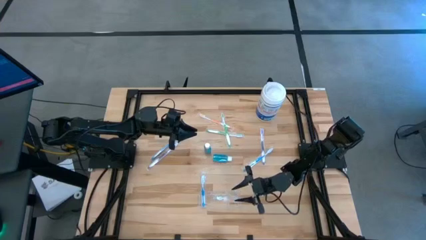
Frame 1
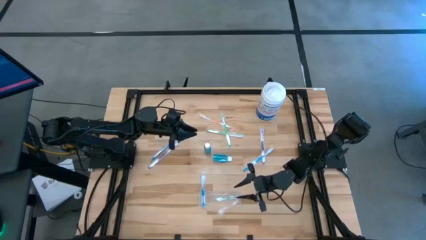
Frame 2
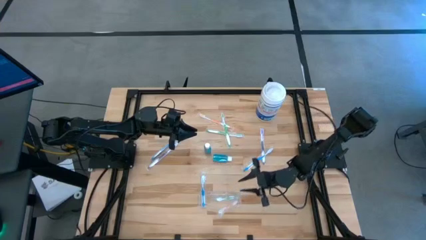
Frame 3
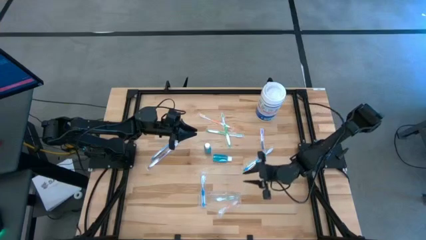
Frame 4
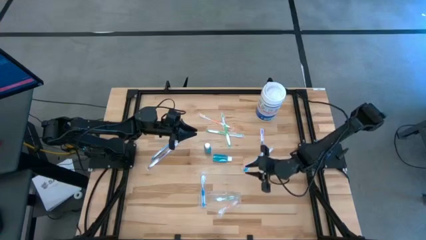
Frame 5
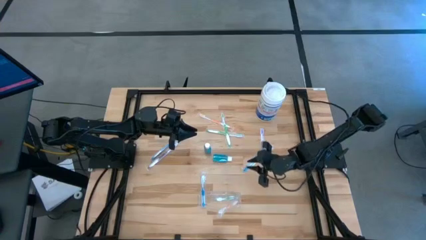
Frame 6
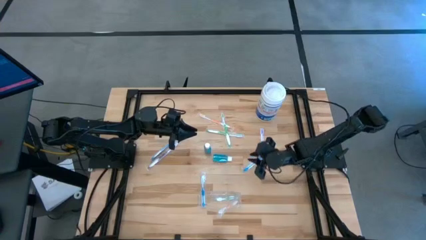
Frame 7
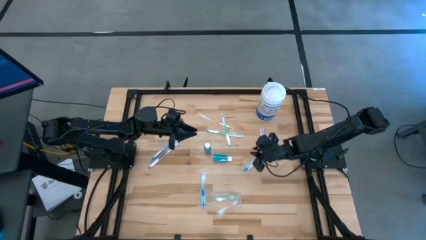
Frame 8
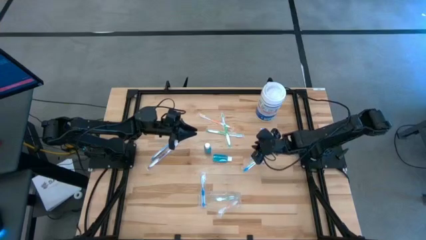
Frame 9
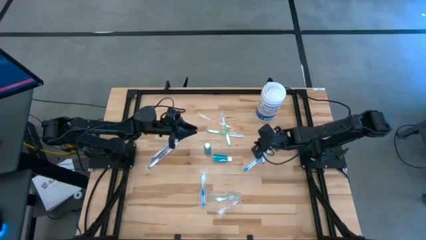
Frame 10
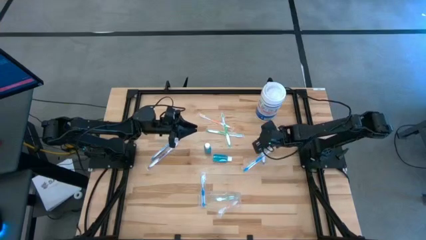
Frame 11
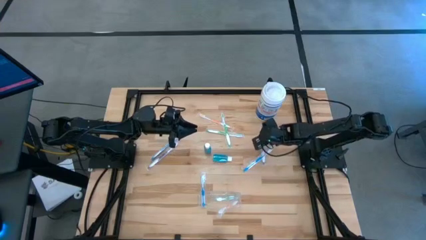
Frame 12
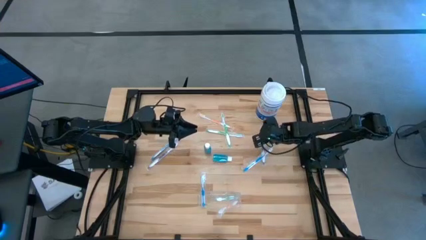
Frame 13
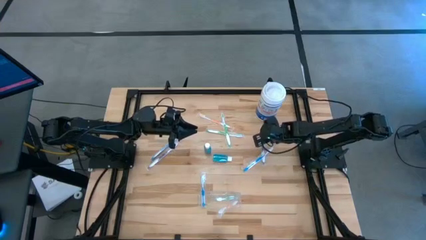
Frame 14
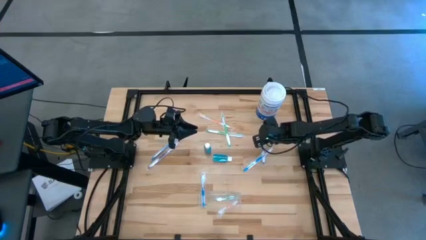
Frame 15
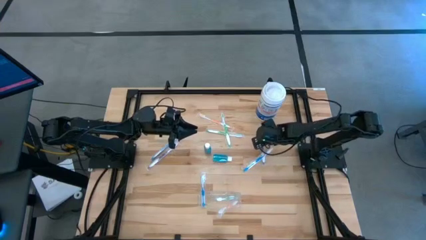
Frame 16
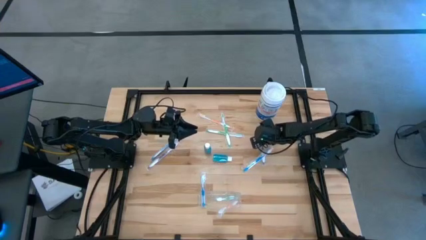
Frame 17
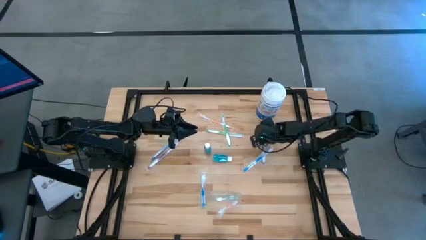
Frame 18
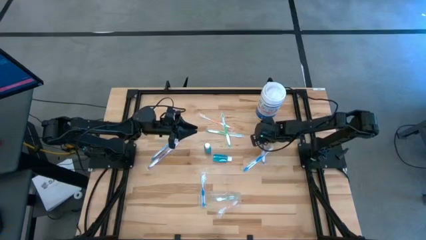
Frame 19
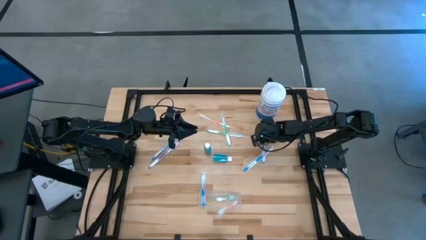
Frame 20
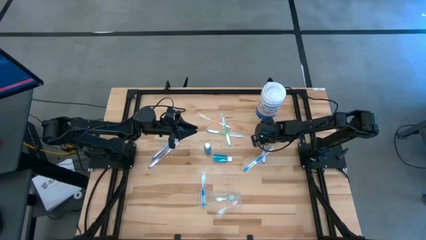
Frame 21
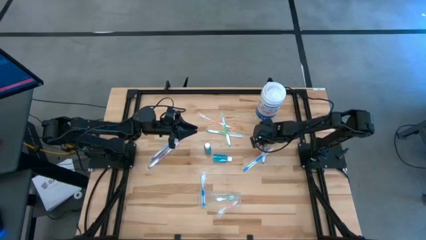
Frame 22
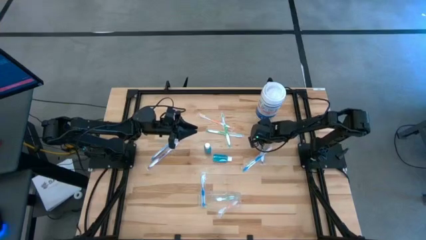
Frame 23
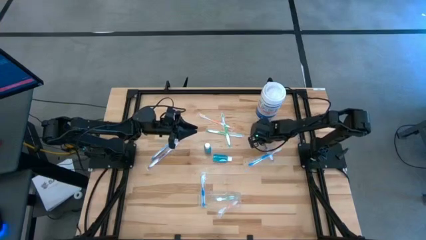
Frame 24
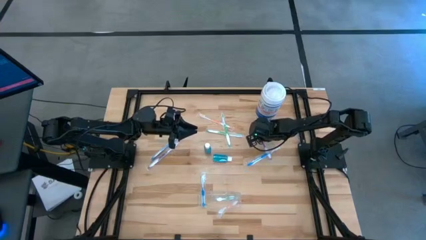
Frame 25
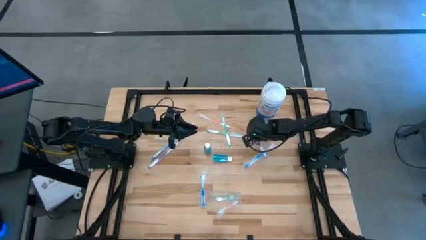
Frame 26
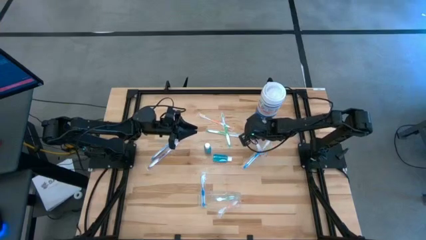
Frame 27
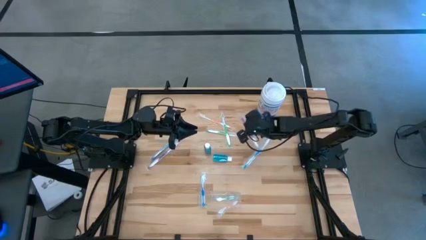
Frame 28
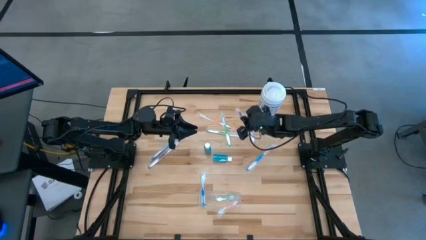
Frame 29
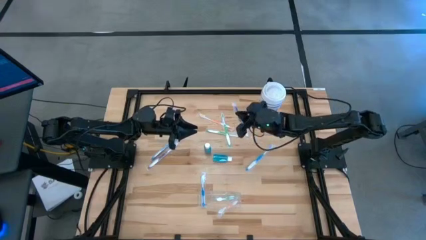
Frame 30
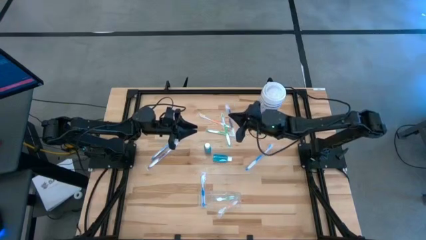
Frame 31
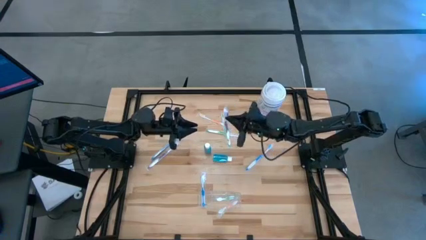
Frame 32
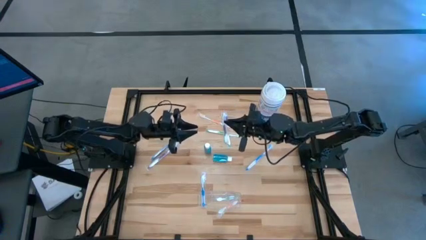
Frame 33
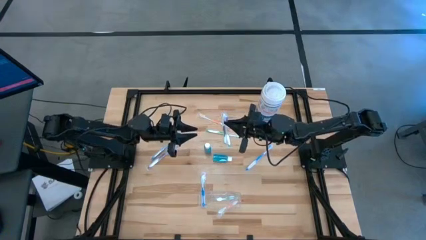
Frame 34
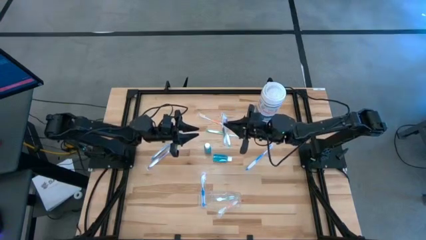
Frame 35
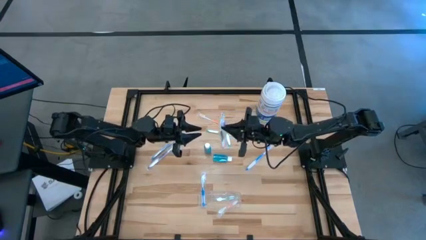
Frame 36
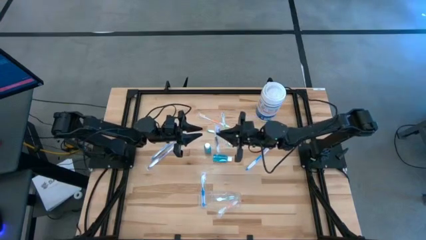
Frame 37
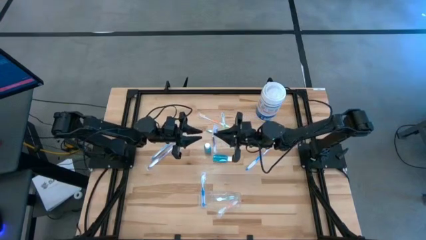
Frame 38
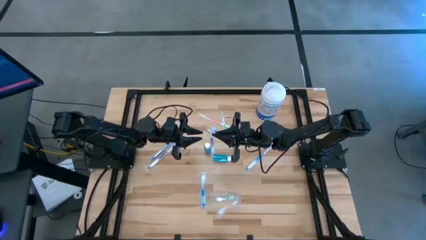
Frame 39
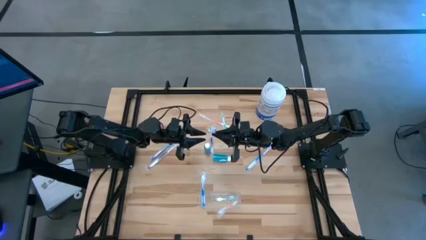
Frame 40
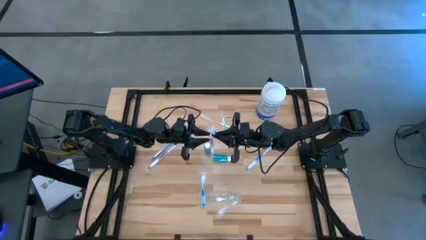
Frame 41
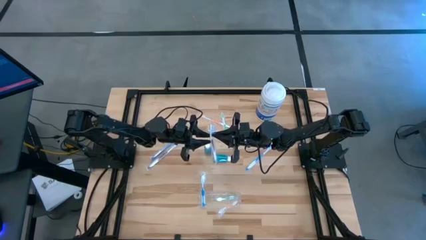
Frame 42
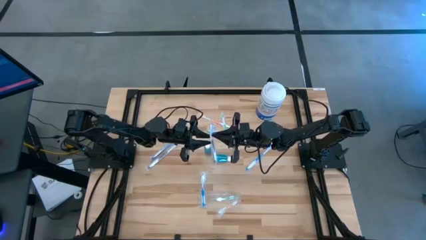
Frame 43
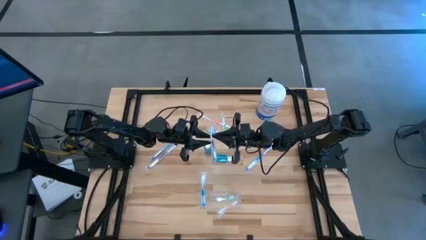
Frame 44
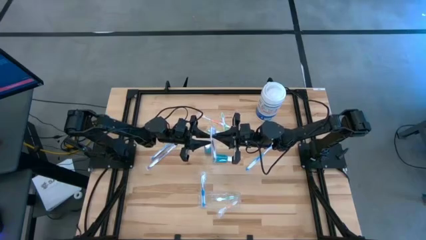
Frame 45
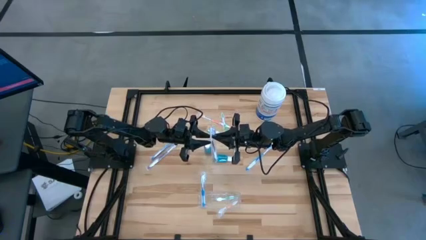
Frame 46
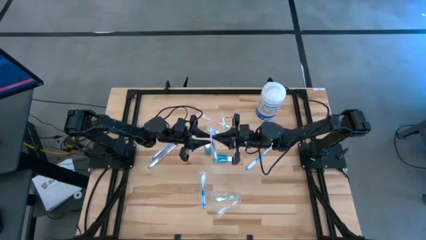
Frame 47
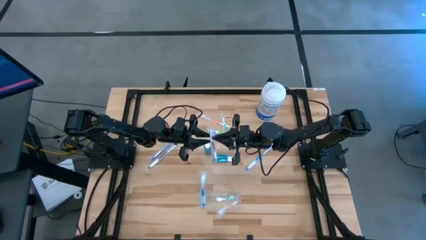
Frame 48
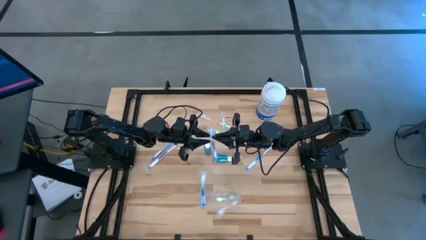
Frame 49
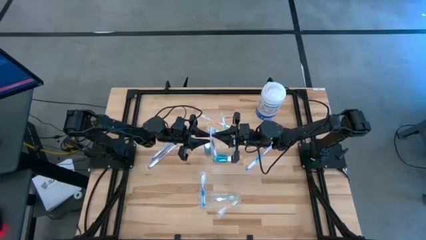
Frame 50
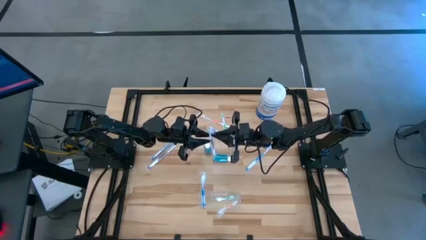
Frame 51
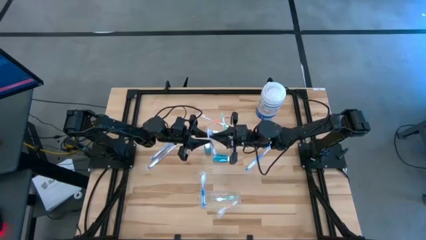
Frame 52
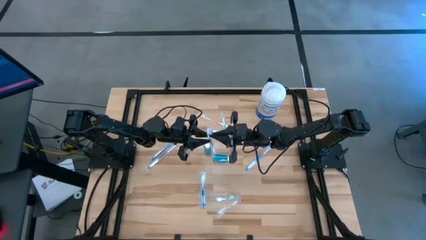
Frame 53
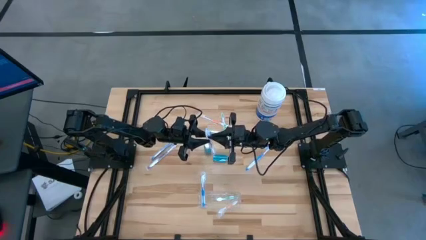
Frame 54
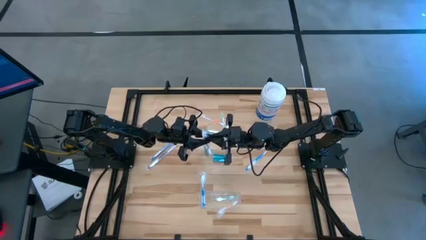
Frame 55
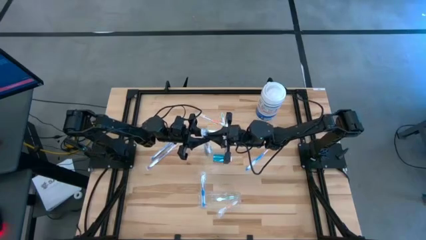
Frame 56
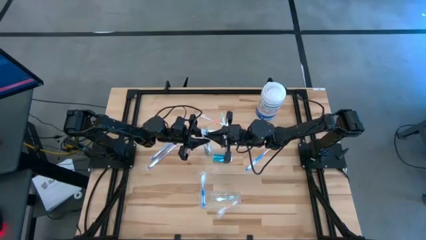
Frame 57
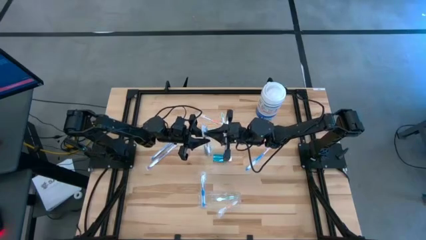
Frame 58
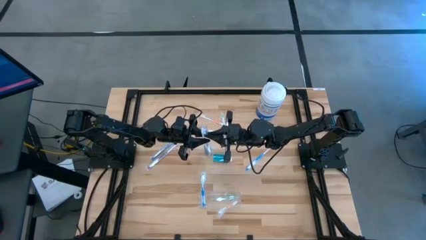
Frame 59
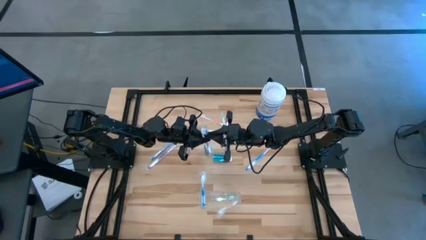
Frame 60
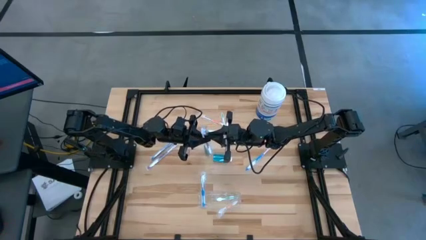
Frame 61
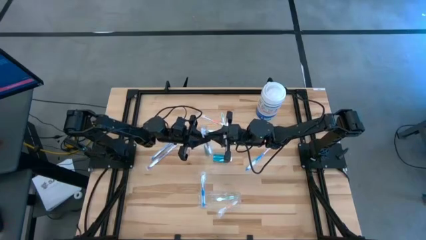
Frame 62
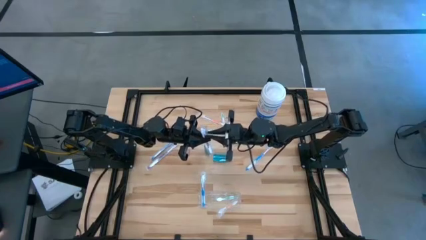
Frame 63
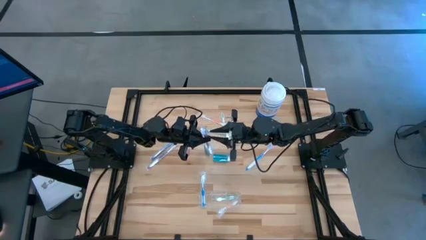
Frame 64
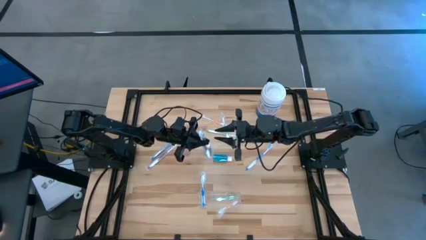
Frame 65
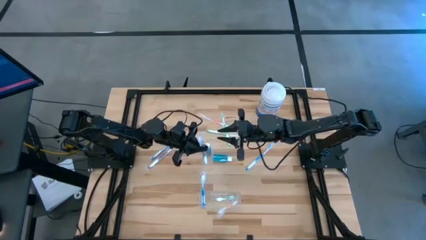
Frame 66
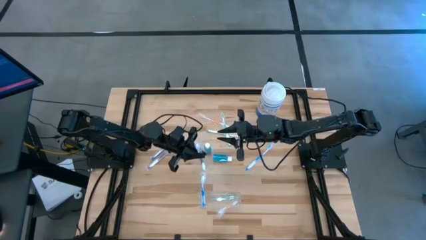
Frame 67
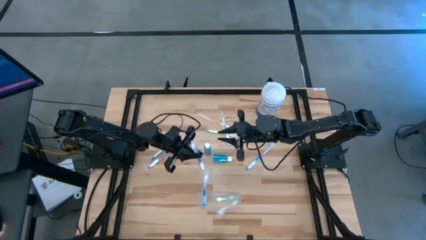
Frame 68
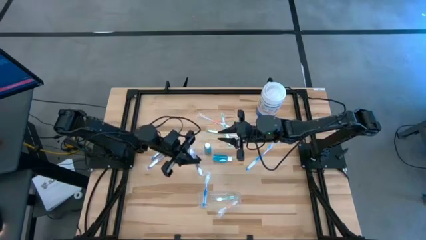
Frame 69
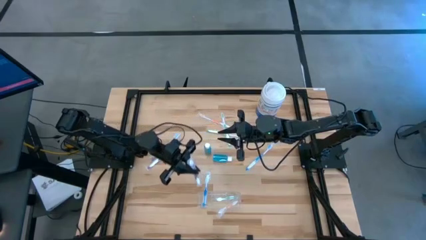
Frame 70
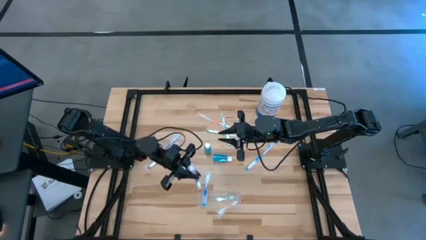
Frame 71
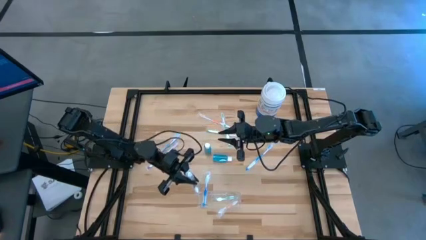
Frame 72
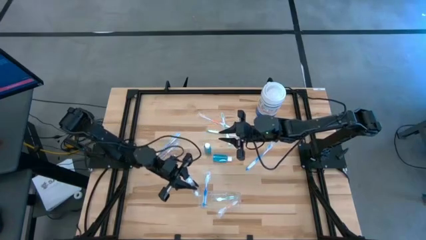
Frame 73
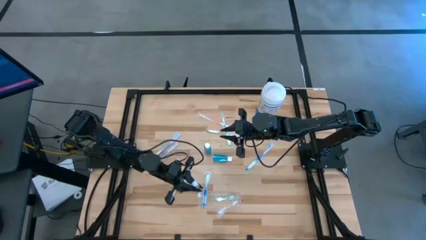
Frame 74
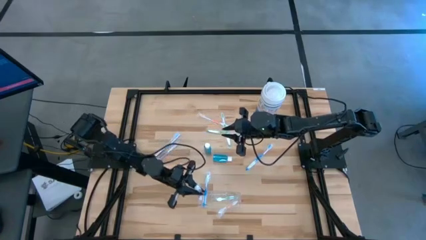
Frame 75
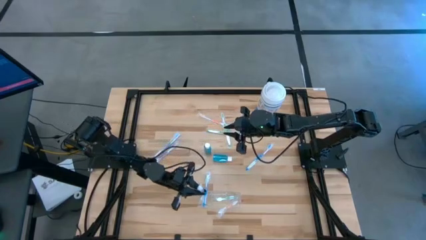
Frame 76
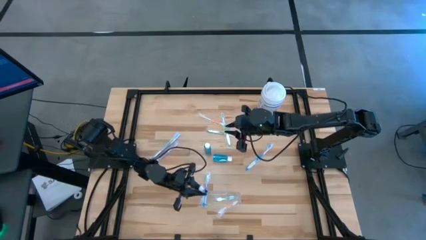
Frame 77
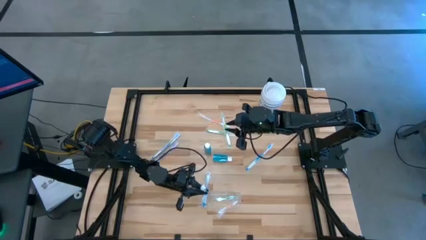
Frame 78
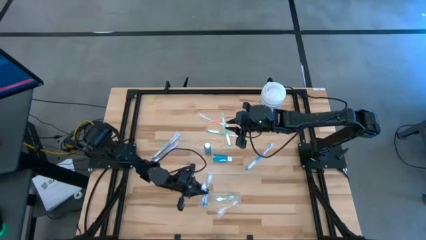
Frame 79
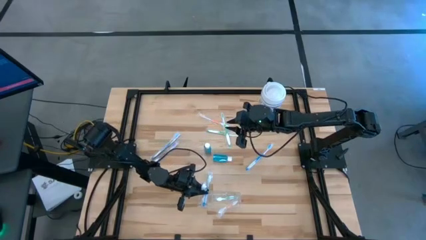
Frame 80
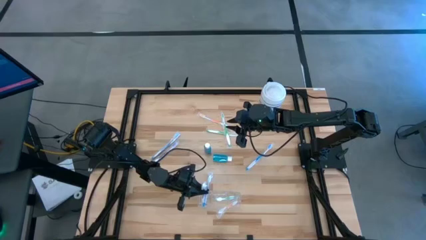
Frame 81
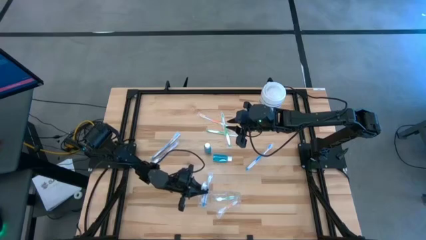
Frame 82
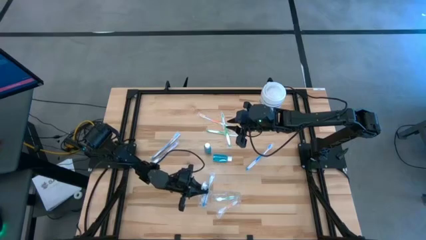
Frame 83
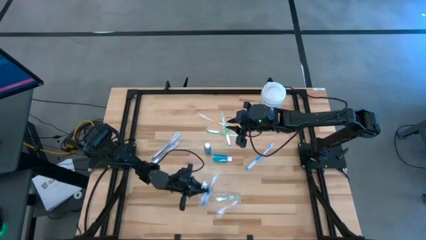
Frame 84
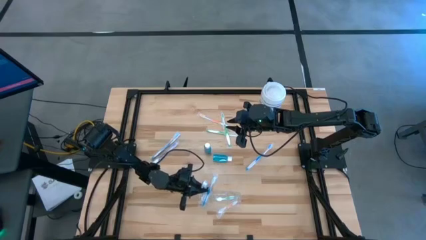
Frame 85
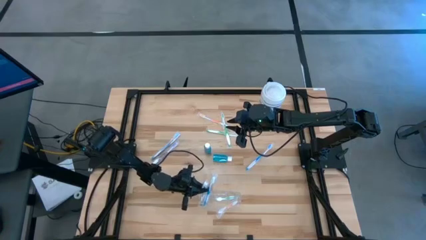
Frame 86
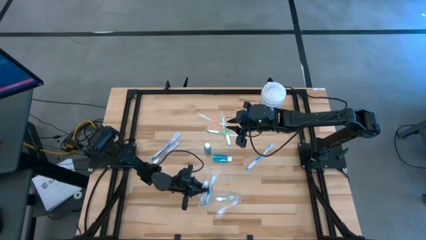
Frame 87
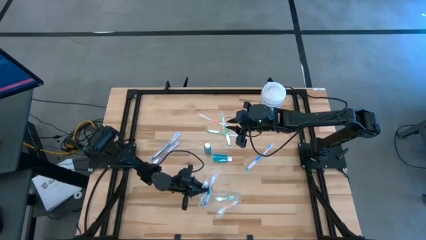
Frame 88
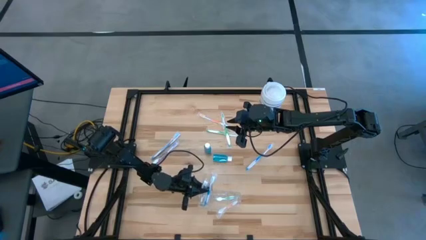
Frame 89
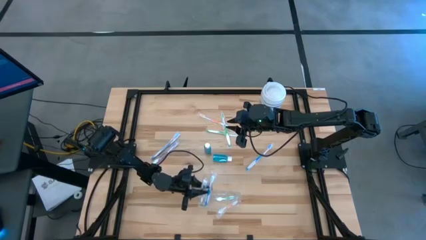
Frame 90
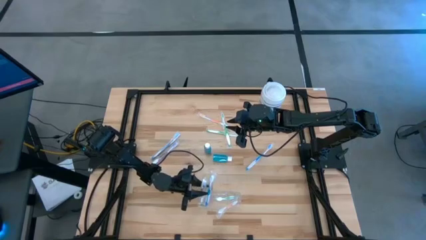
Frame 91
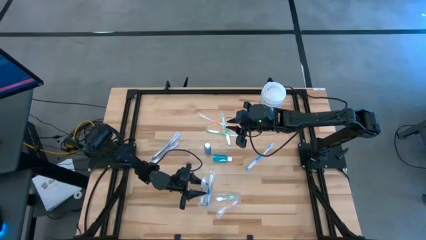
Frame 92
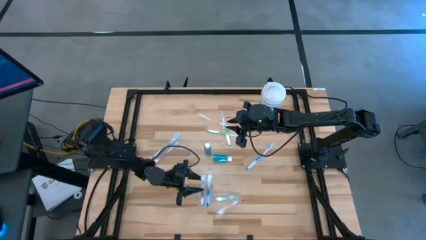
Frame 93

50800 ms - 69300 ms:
Task: Pick & Place toothbrushing station
Put the purple toothbrush into the transparent organizer
